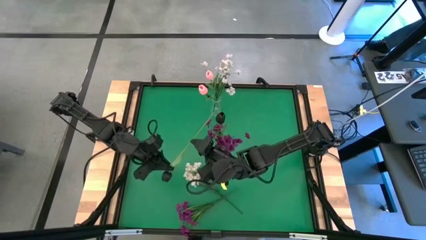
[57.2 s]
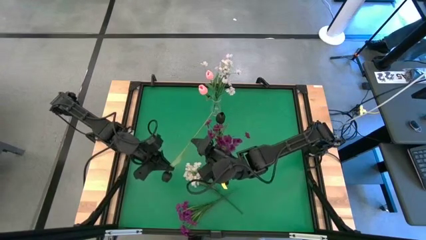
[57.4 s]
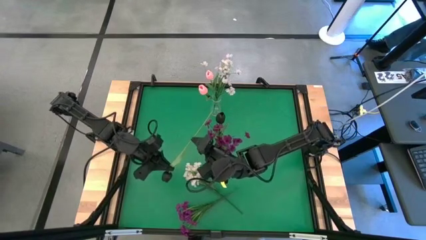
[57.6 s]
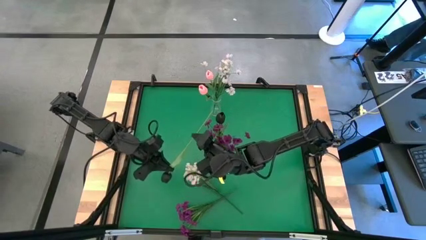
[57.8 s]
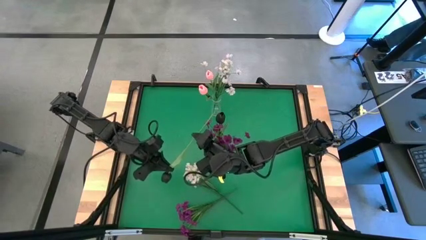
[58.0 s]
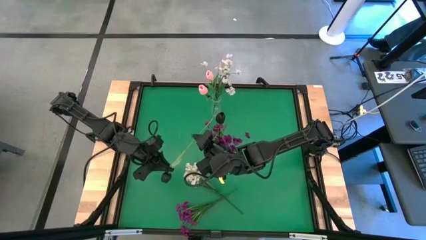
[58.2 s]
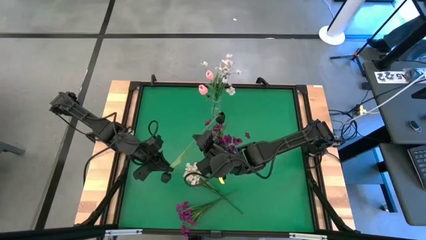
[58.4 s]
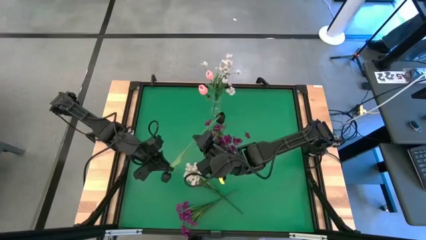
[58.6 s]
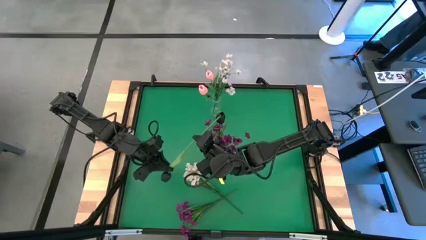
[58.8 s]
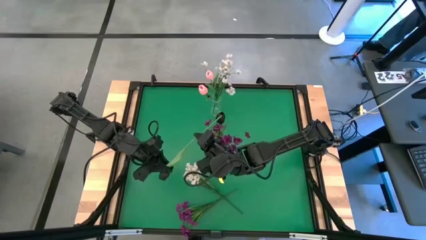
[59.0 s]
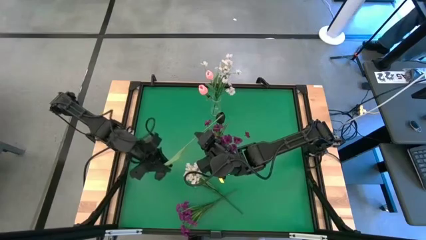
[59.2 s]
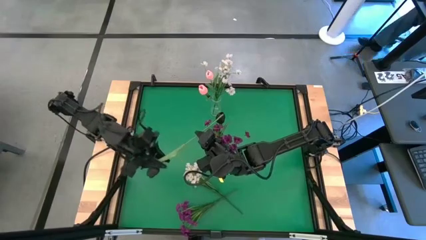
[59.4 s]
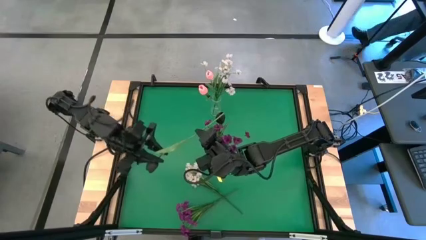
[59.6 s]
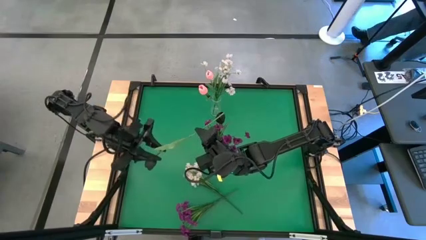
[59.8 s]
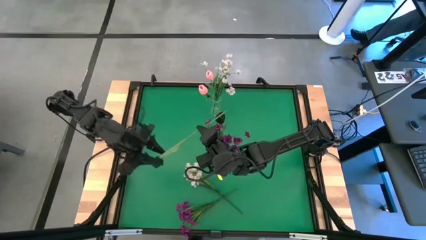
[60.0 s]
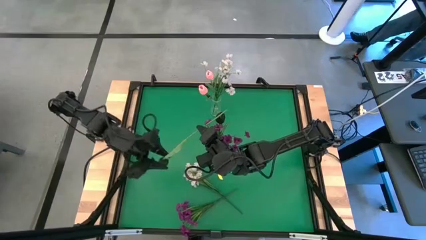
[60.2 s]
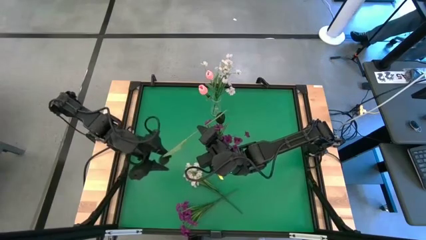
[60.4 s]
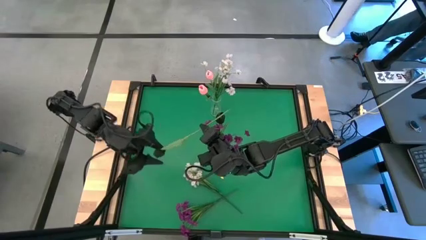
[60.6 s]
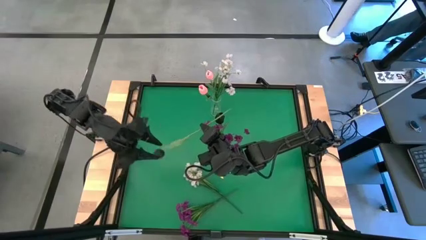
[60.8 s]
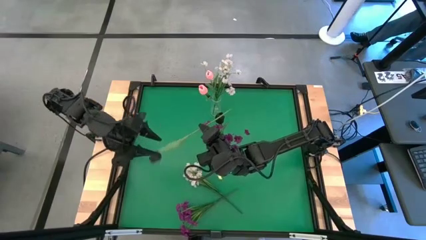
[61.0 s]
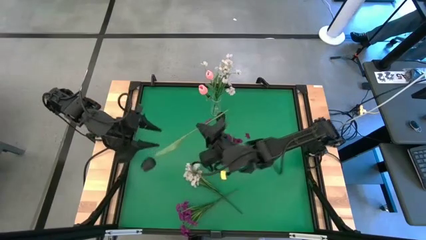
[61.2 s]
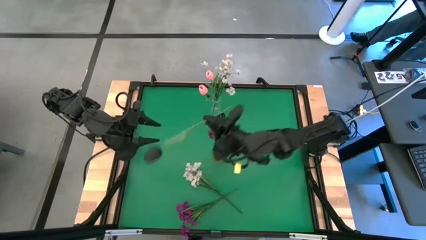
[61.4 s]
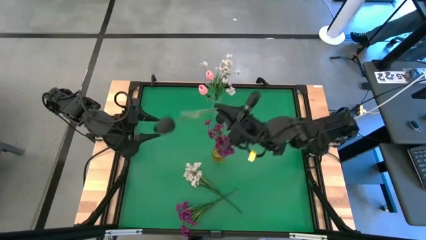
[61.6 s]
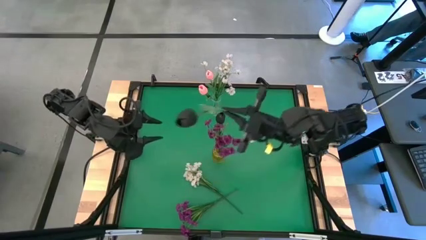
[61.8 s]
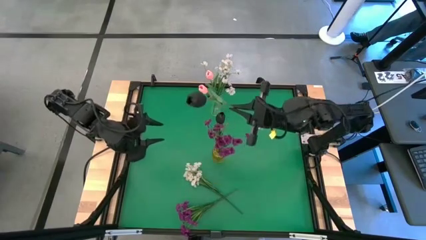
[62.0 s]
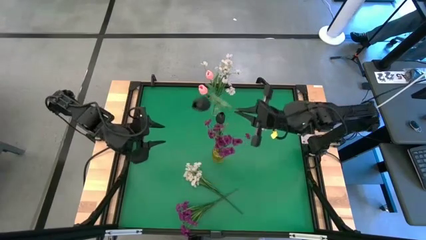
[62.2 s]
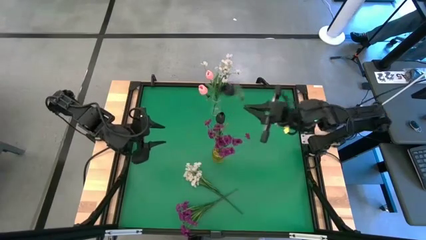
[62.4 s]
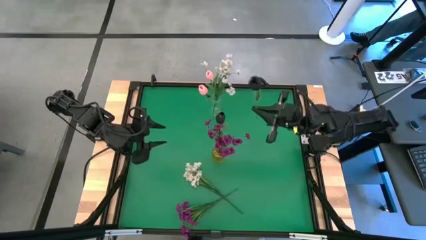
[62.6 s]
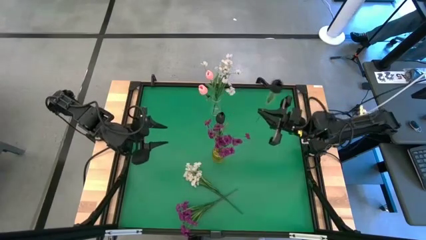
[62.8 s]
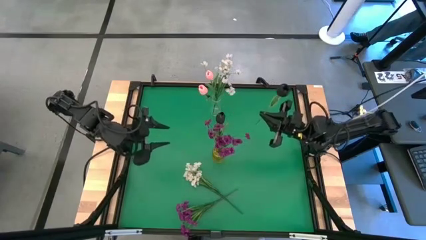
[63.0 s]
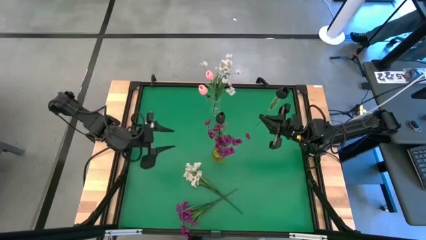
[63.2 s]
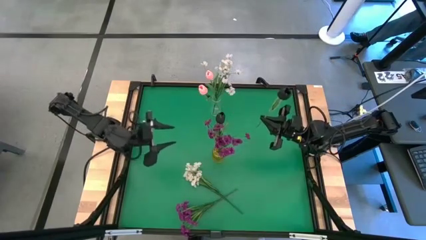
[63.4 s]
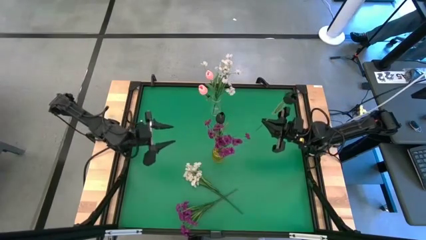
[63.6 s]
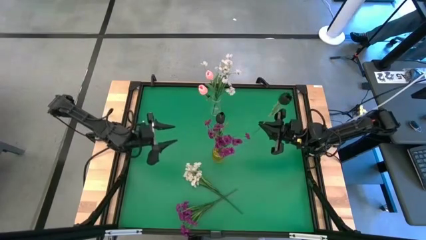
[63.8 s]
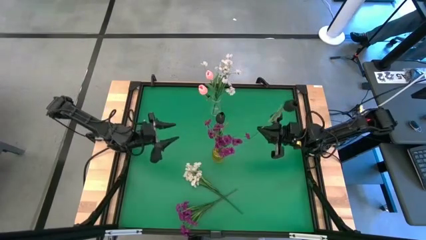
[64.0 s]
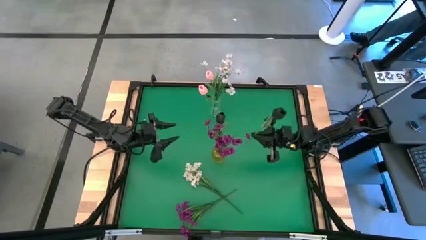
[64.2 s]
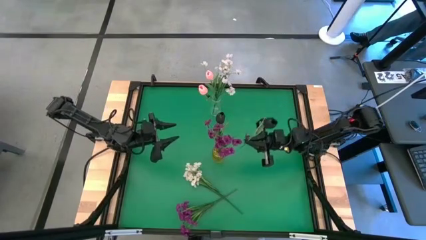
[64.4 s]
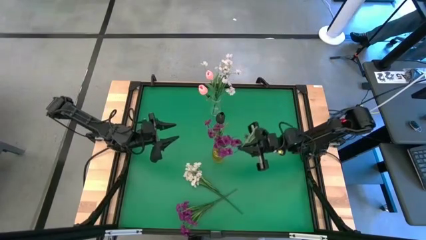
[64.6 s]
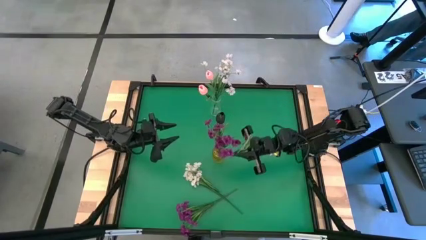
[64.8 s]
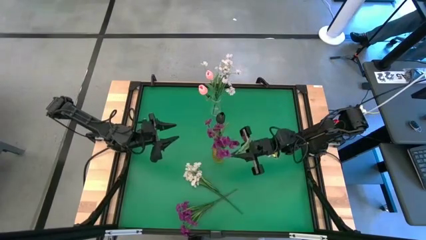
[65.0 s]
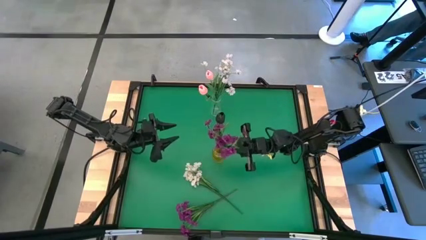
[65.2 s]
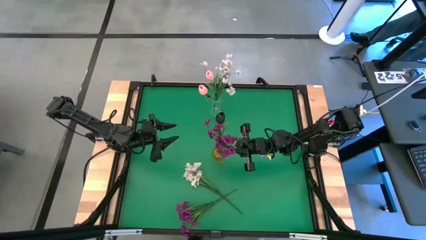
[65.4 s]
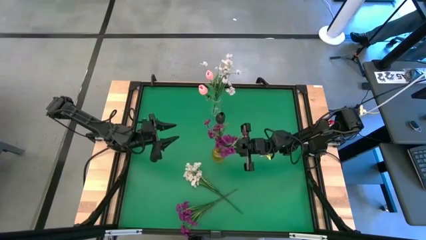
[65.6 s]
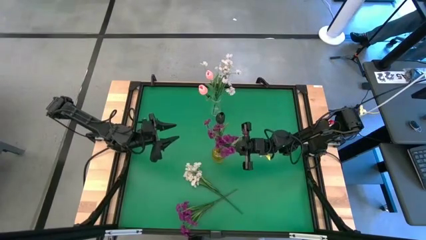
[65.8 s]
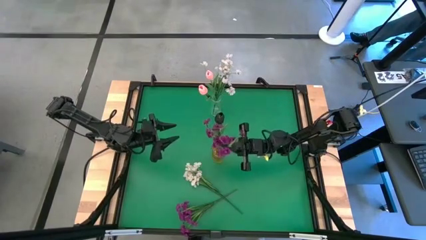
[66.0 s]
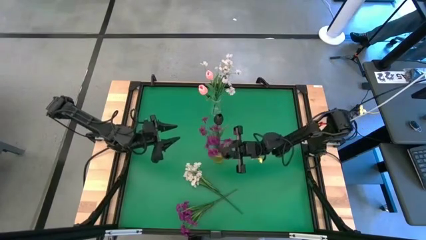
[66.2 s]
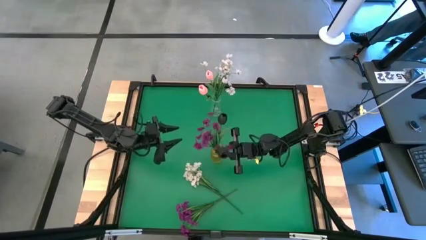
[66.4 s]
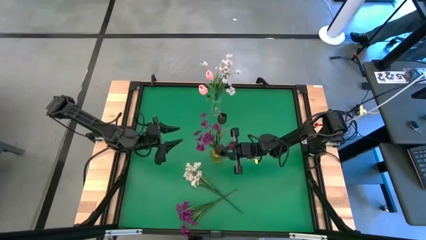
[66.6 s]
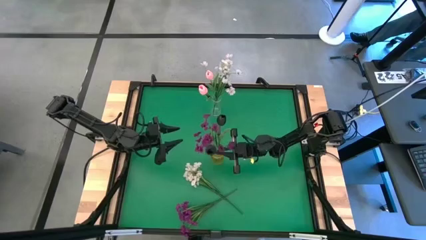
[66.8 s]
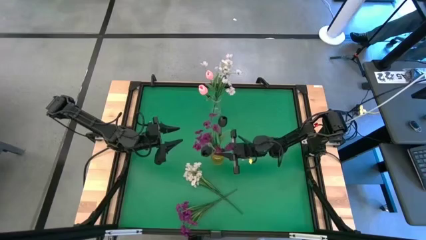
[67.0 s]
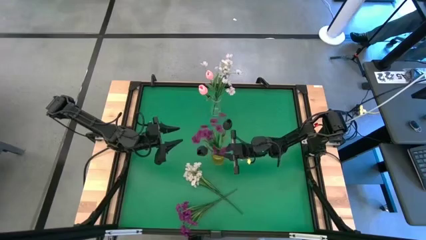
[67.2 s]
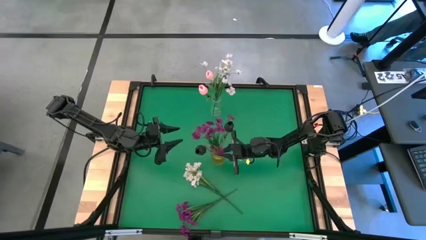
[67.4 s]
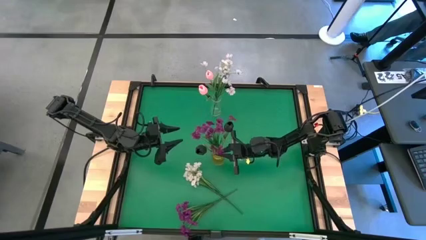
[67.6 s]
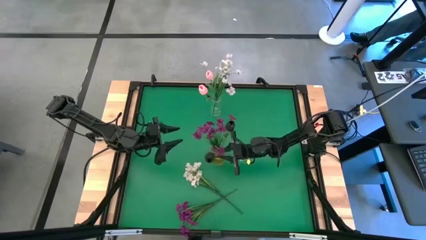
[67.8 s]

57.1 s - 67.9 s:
Task: Sort flowers into vase by color
Put the black flower into the yellow transparent vase

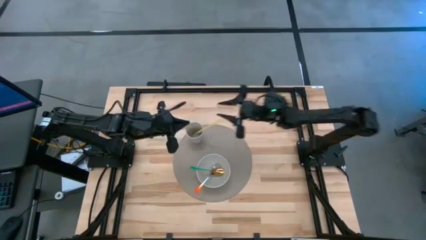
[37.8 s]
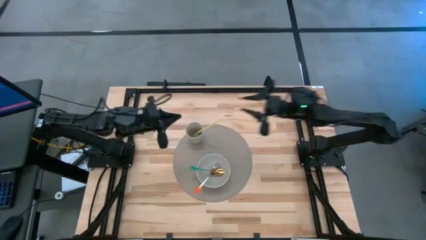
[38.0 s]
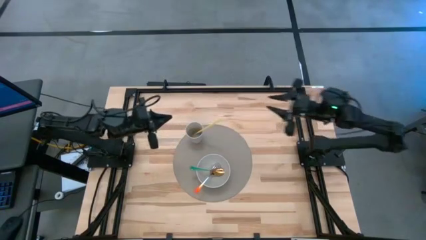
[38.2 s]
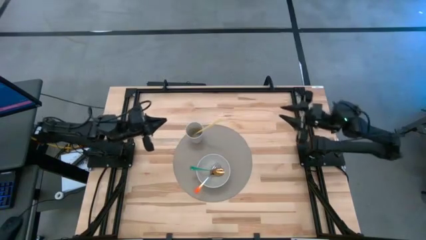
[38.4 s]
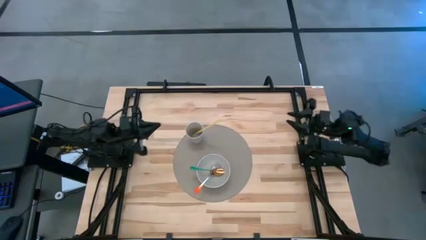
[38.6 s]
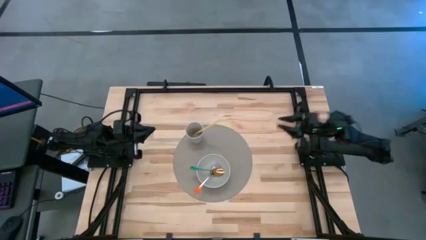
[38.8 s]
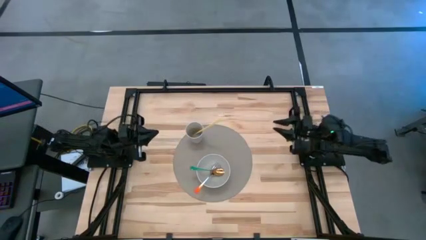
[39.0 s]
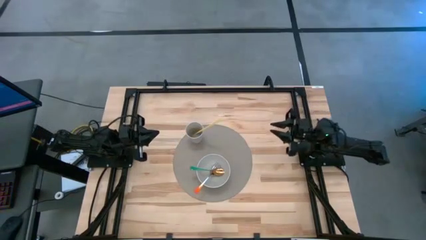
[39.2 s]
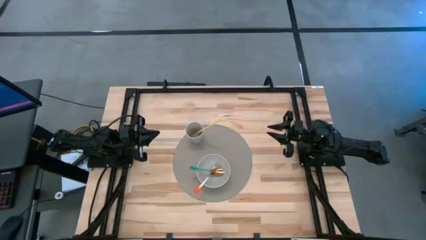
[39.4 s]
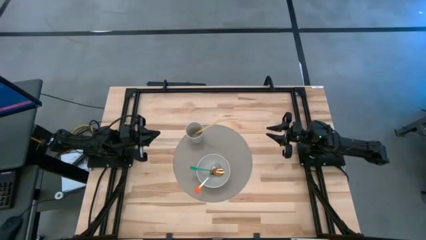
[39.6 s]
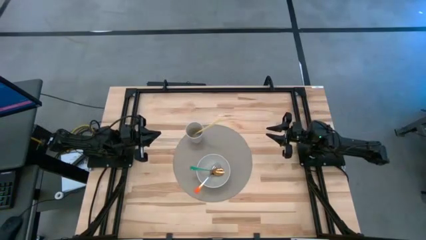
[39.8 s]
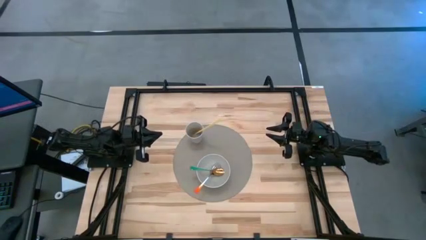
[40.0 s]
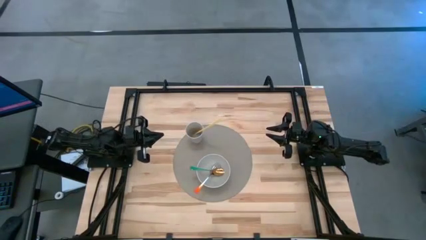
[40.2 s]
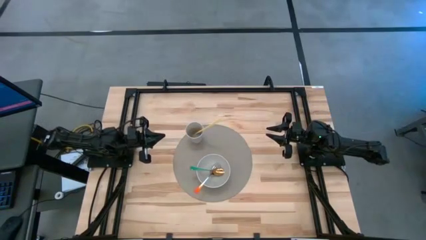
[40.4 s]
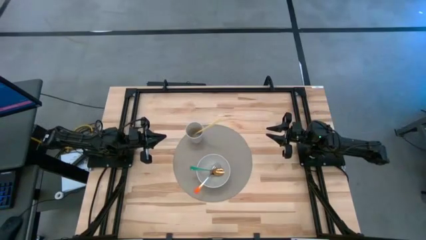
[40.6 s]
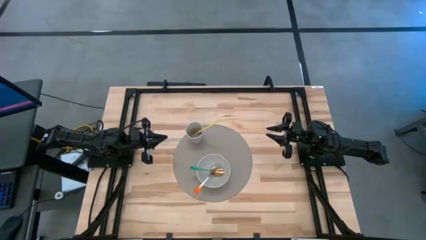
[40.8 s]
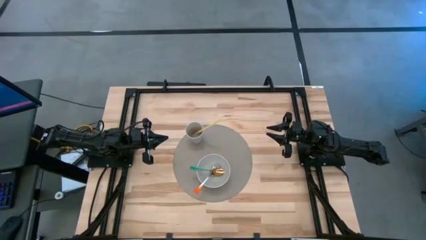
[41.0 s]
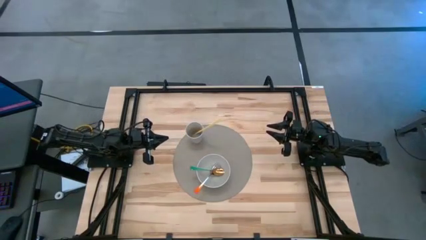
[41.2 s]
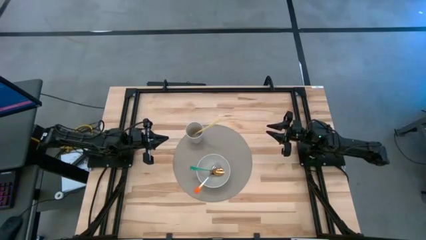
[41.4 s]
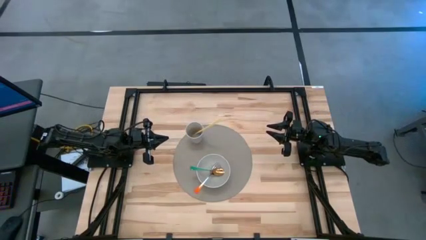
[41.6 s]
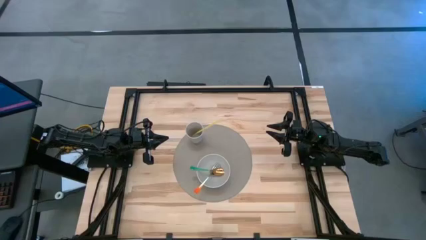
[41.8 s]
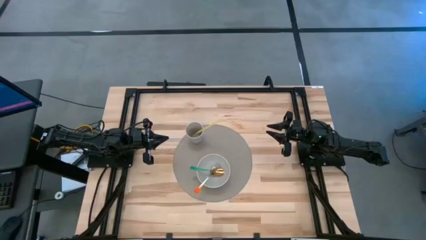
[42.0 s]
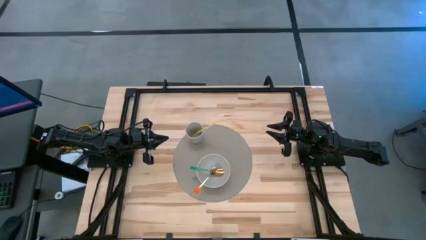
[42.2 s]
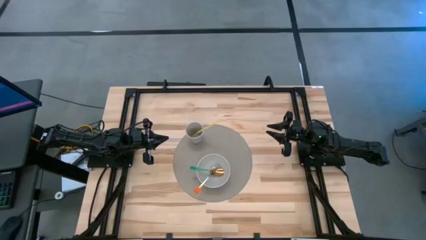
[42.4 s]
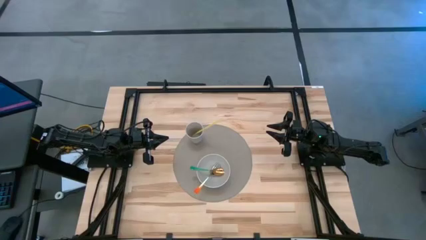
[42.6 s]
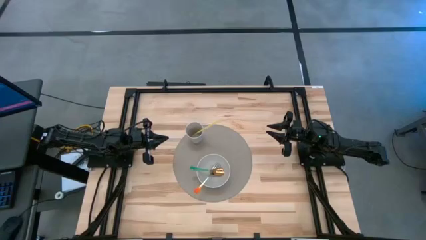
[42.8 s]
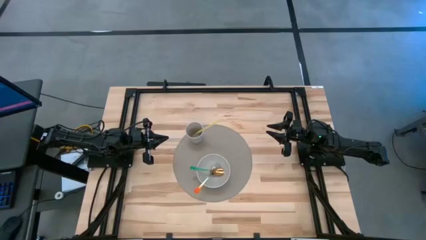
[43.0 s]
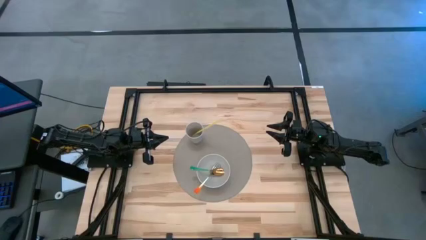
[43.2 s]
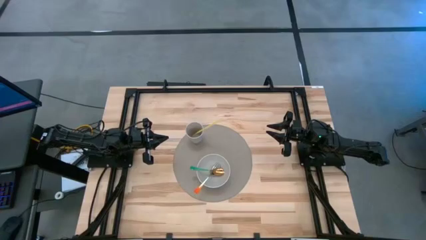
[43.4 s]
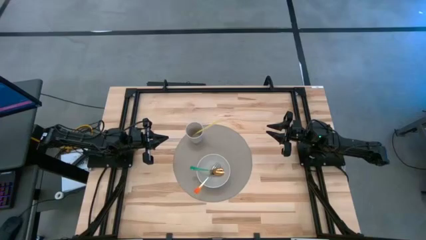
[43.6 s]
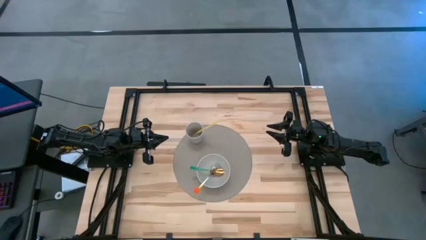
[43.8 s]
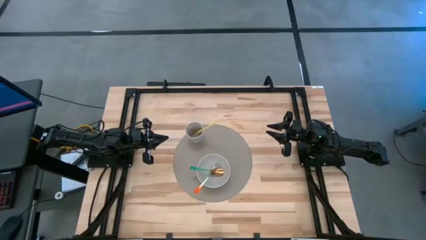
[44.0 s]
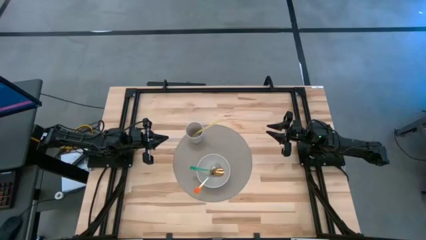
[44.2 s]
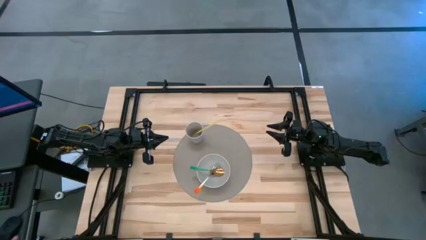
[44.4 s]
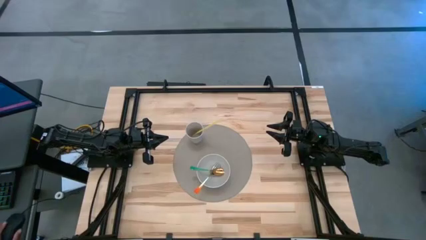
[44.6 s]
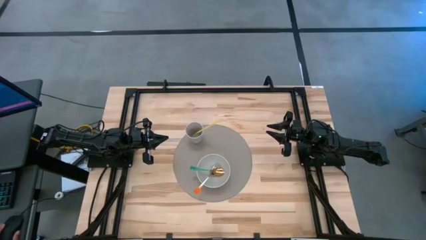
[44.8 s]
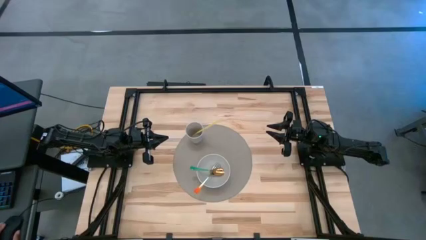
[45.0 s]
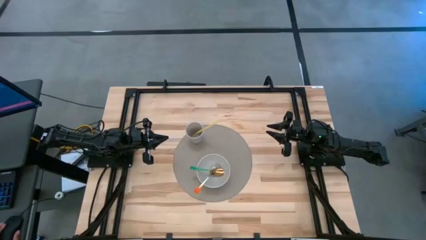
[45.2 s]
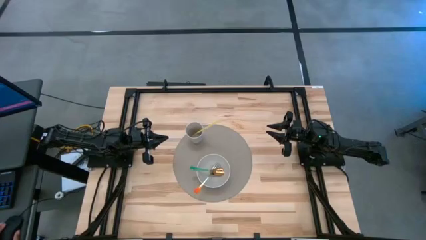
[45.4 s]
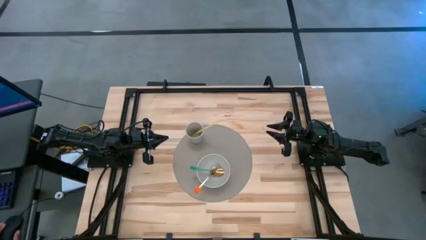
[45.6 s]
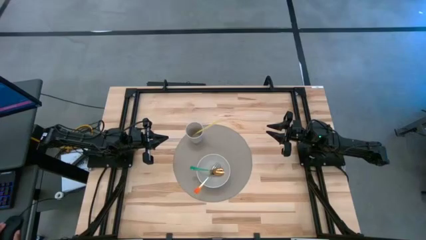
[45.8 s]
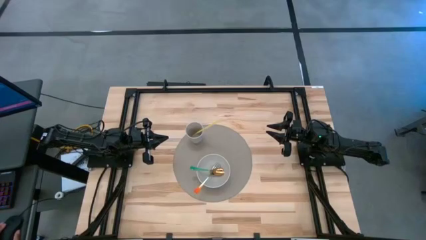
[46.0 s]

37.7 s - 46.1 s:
Task: Pick & Place Utensil
Return to Home Position
